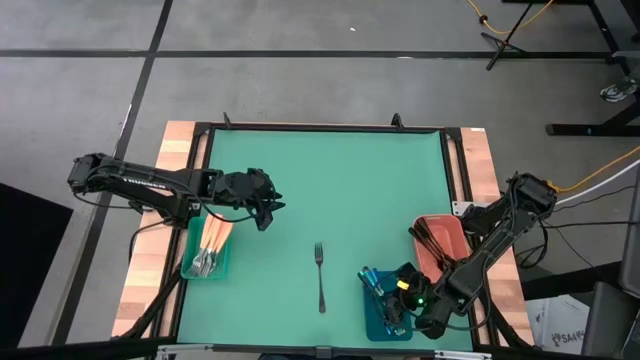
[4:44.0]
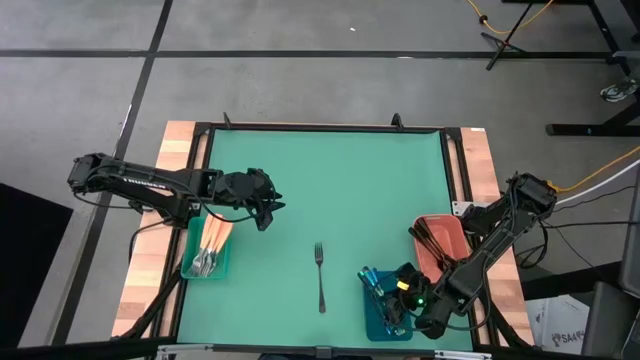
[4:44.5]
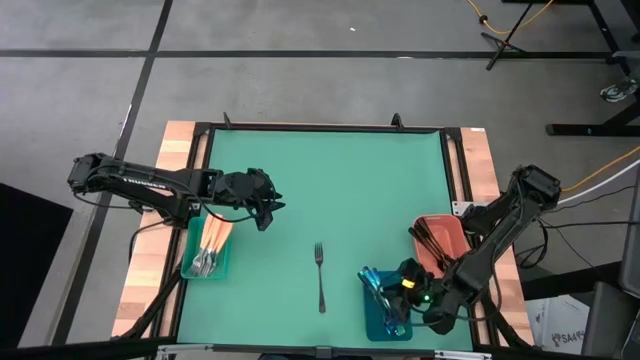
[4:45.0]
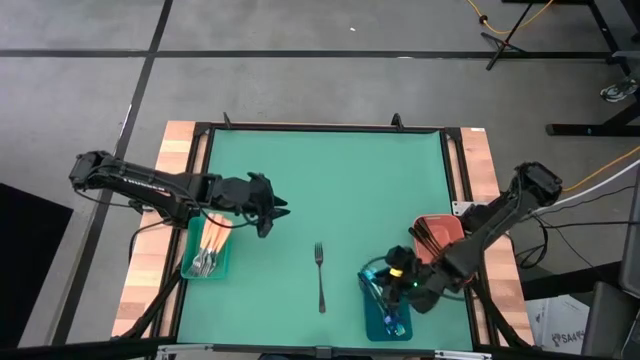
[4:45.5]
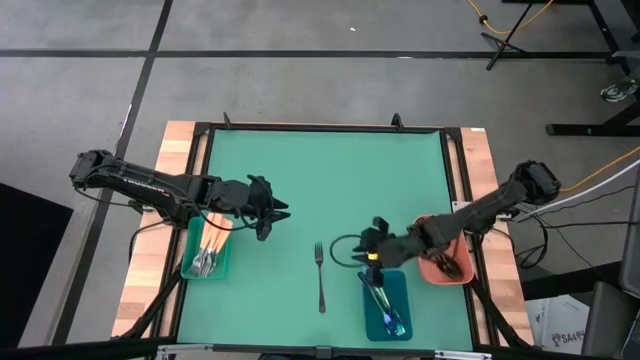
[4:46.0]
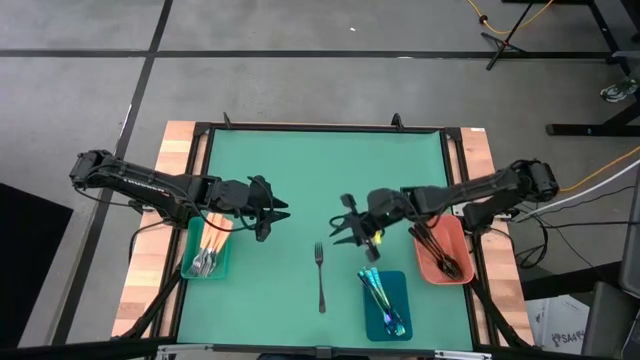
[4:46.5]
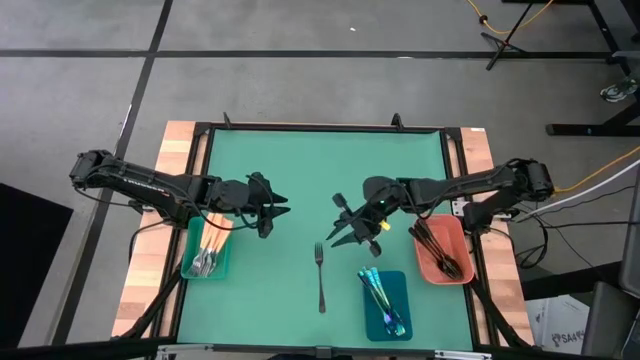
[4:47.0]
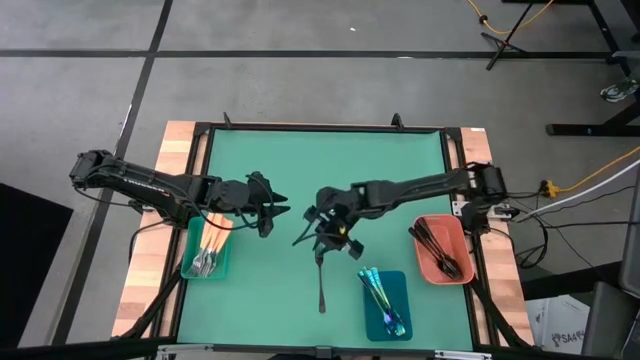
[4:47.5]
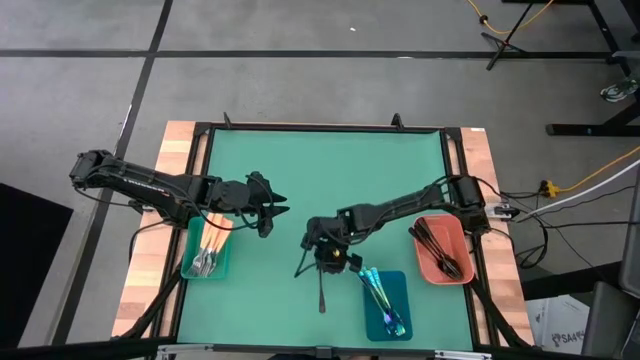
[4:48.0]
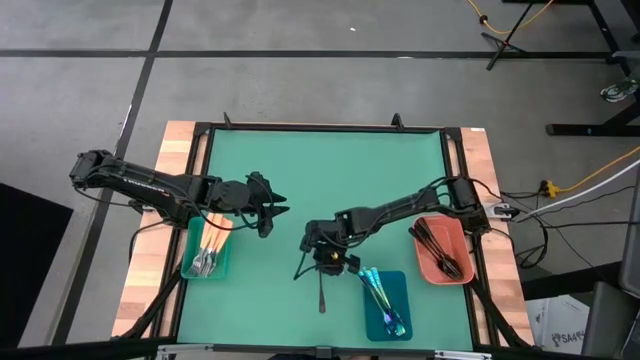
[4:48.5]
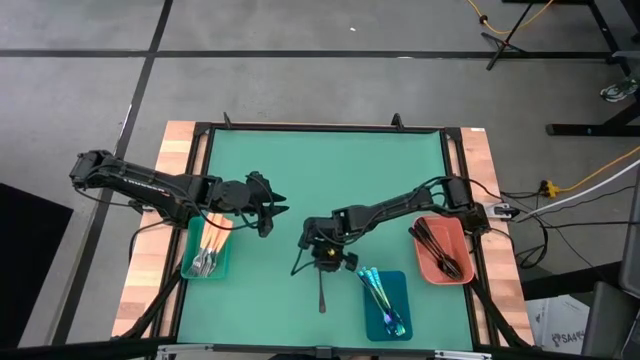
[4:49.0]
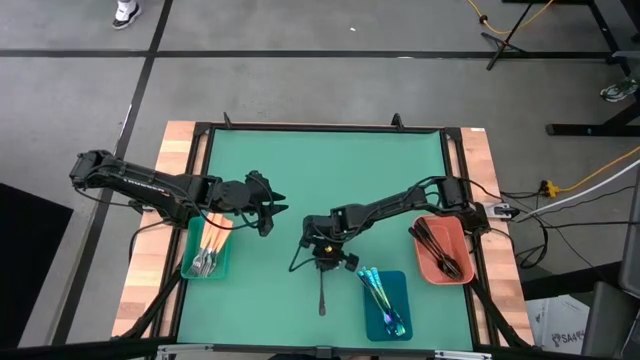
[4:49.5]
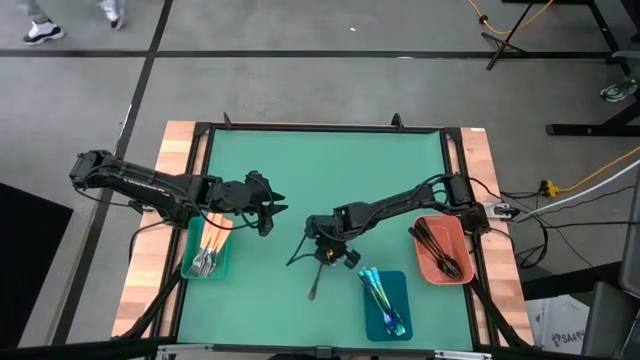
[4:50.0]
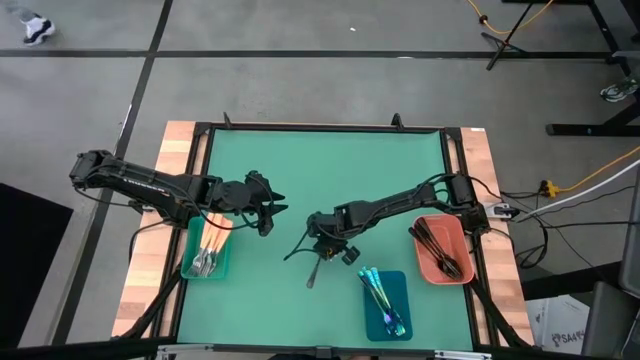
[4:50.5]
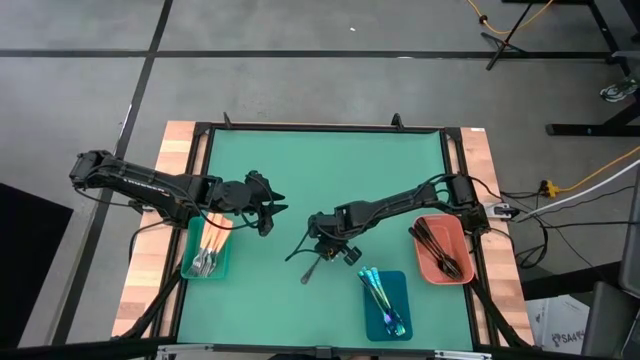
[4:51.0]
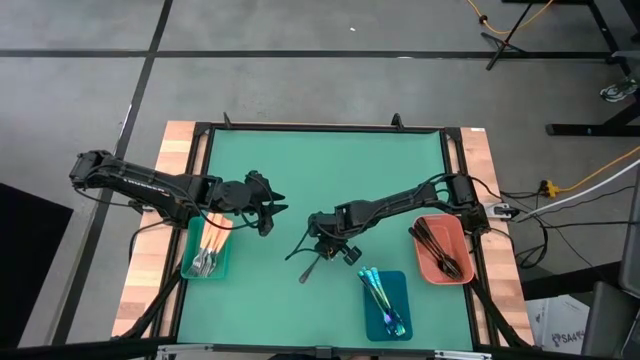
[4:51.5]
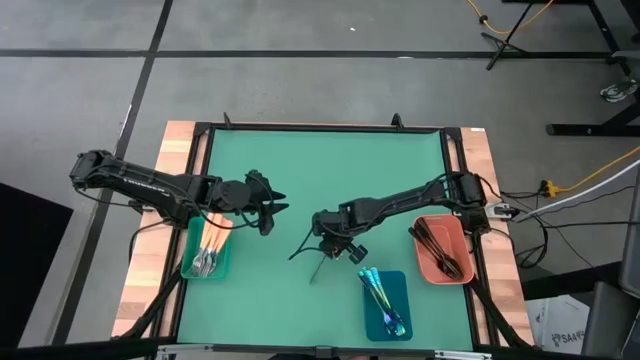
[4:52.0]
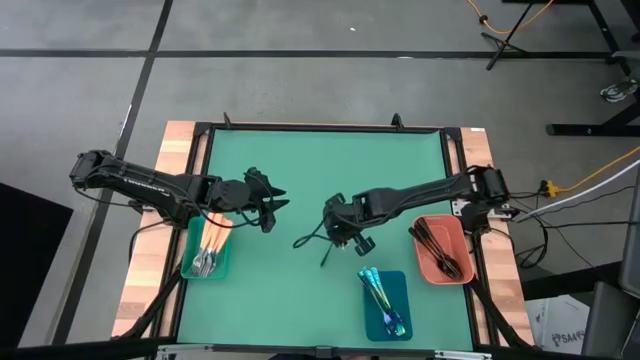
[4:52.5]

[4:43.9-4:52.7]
Task: Sort silverware by color (type)
Put the black fork into the orange bin

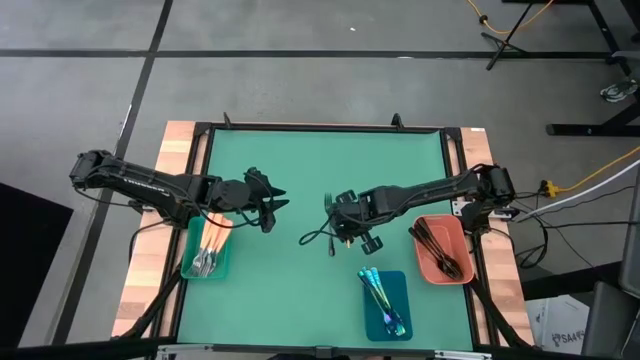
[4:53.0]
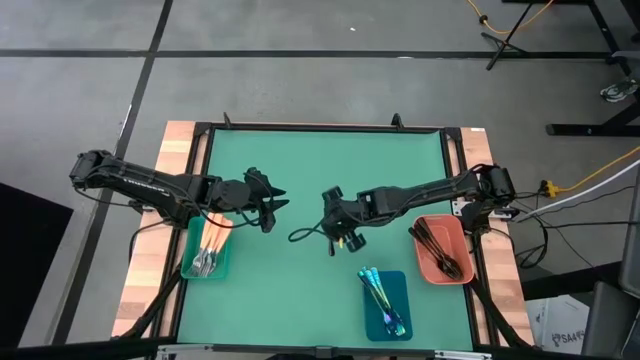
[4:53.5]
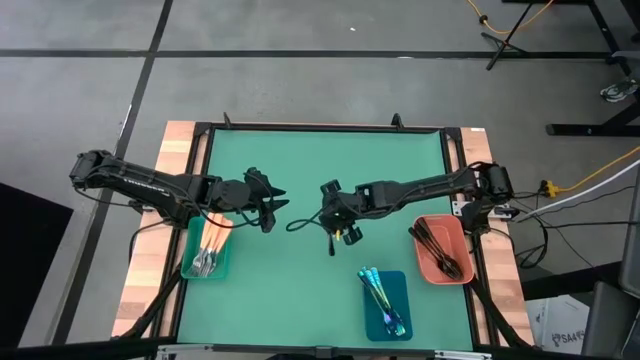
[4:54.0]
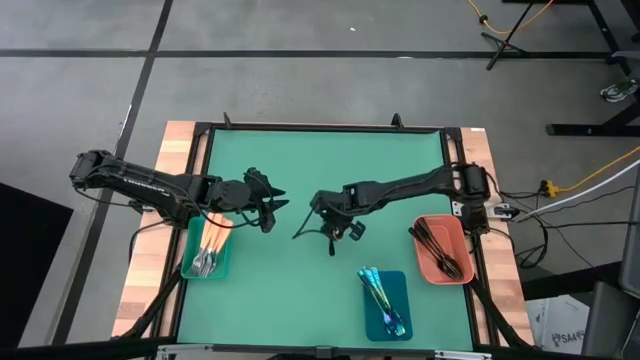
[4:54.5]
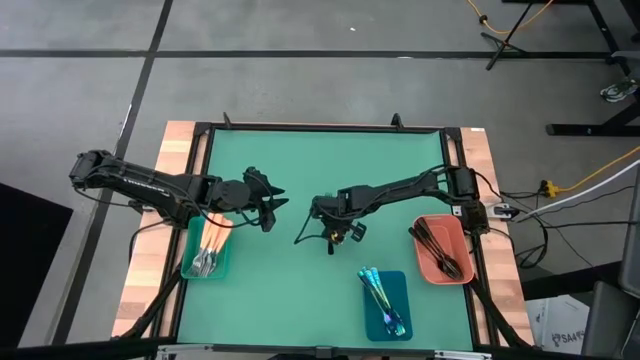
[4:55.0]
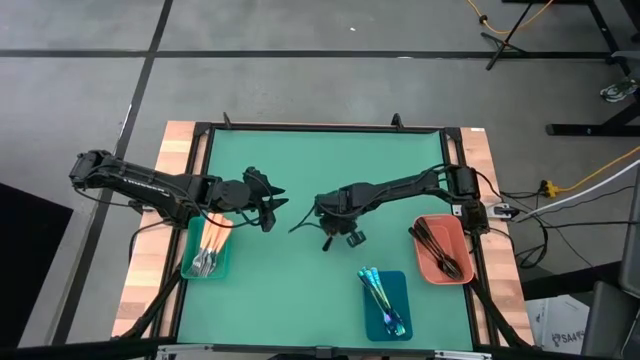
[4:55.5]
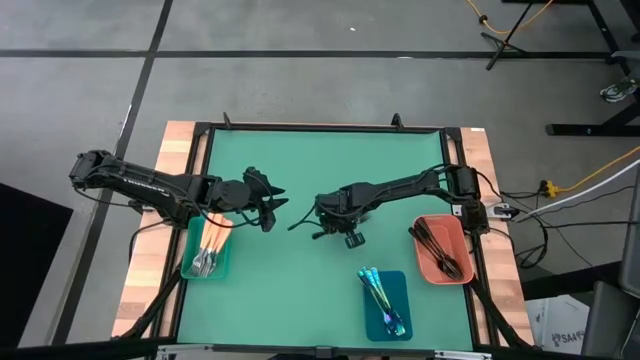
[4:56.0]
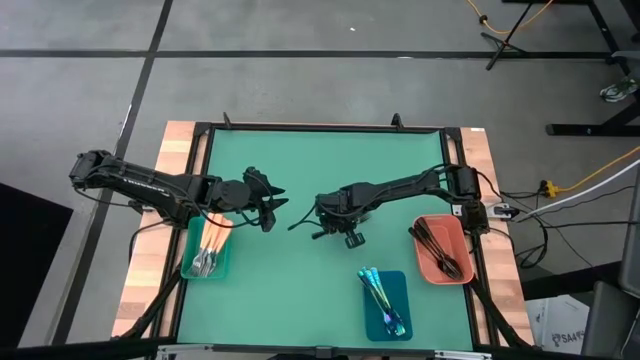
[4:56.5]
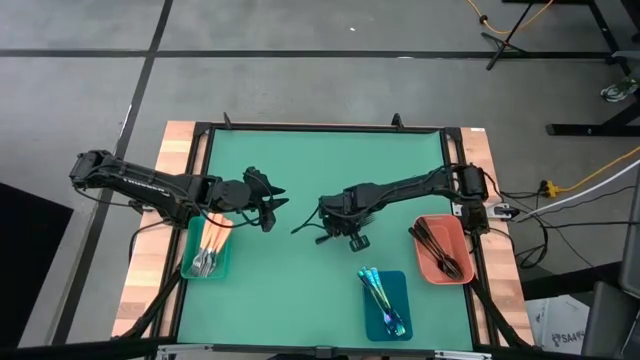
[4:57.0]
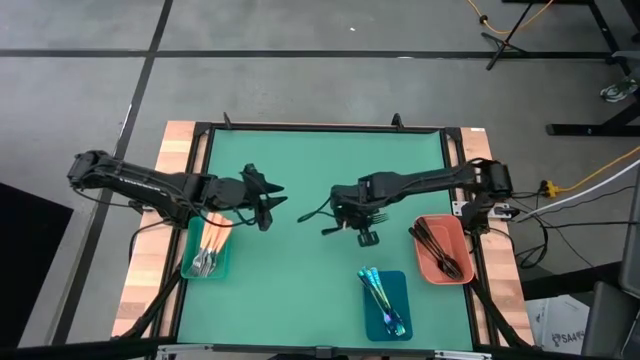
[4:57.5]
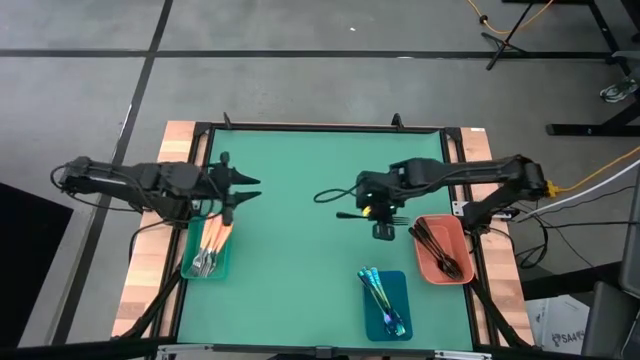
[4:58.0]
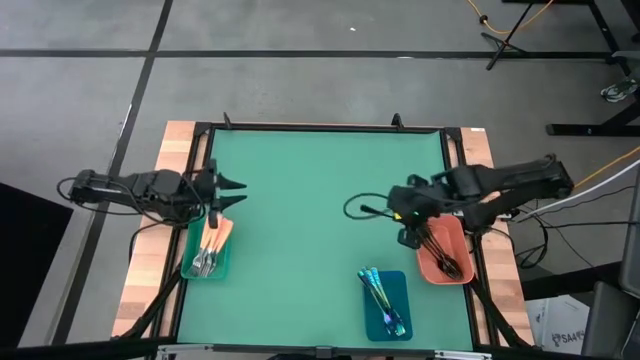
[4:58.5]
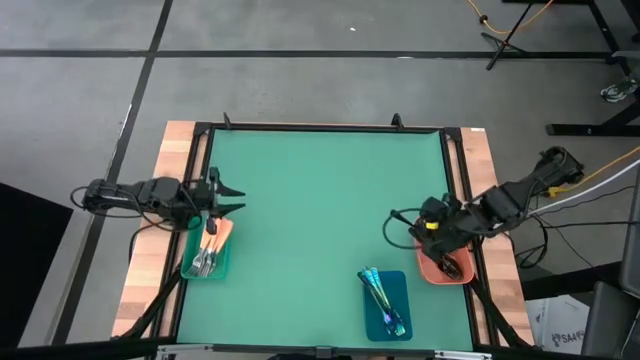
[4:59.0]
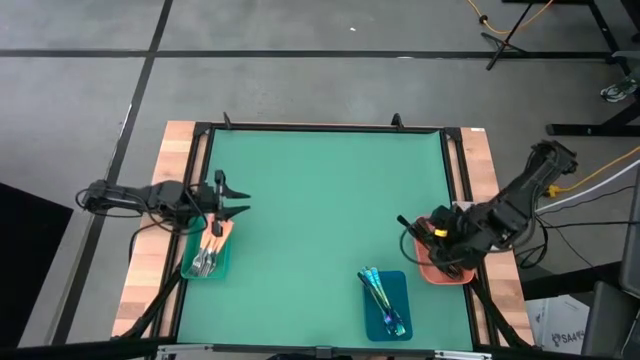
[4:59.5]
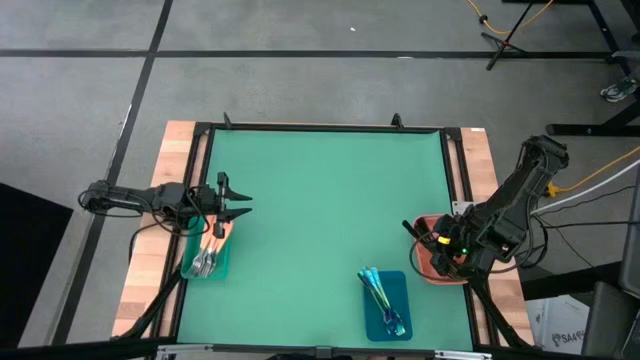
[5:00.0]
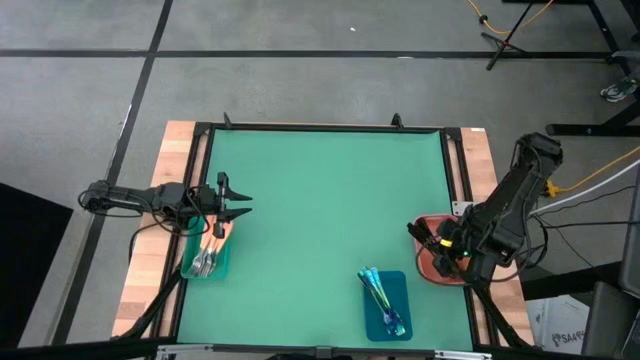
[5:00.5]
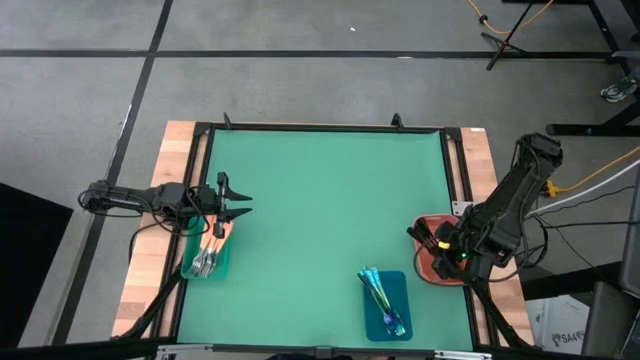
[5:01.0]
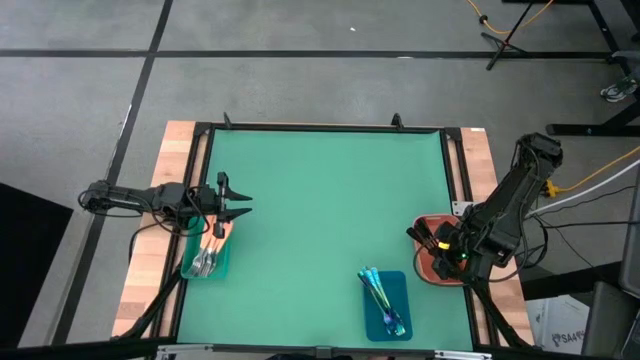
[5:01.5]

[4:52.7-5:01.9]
Put the black fork into the orange bin
